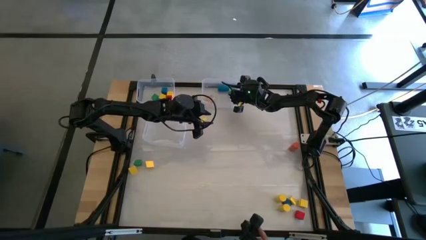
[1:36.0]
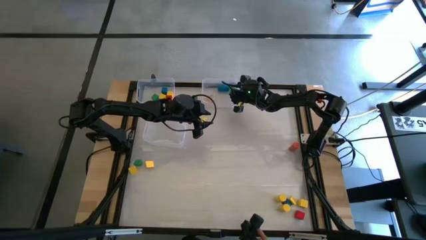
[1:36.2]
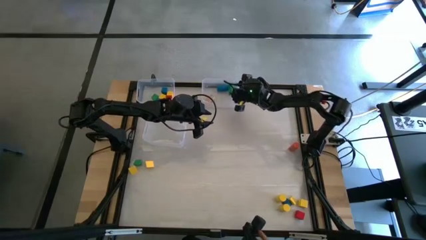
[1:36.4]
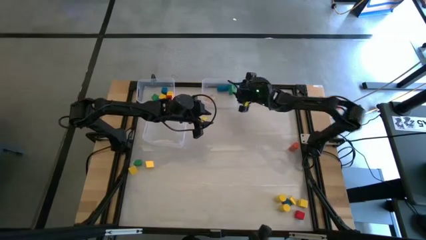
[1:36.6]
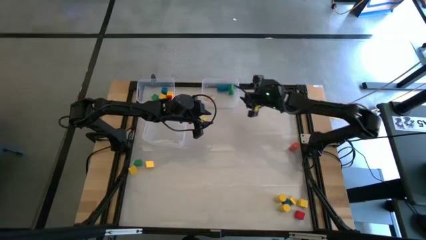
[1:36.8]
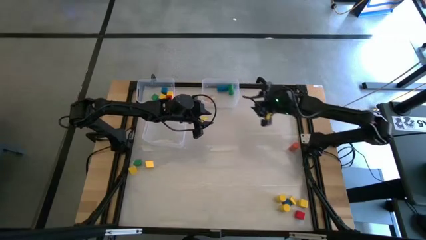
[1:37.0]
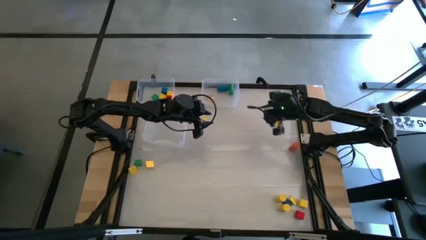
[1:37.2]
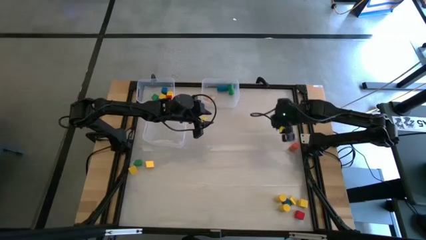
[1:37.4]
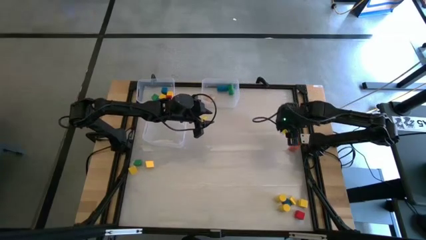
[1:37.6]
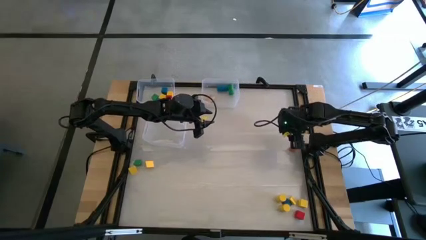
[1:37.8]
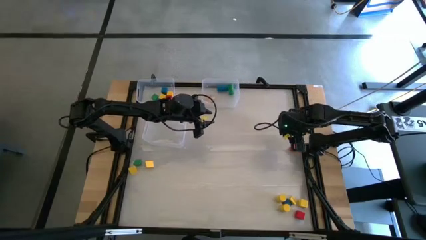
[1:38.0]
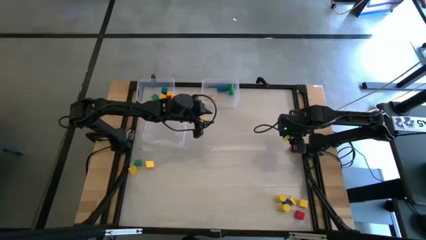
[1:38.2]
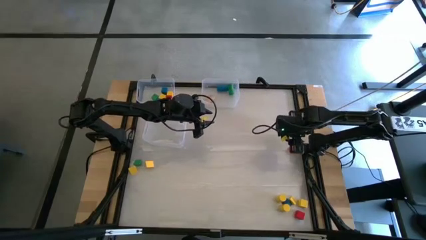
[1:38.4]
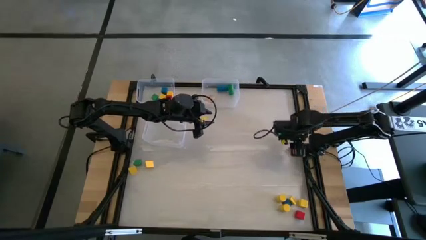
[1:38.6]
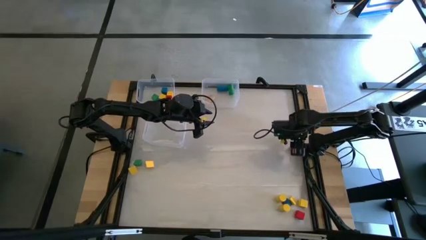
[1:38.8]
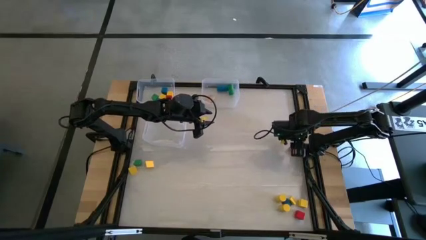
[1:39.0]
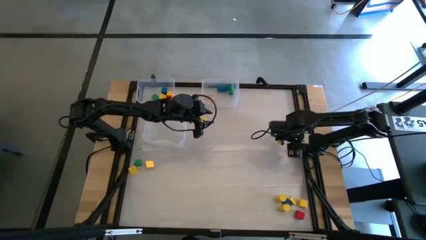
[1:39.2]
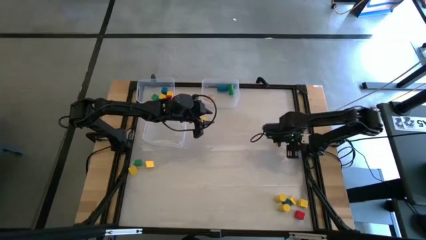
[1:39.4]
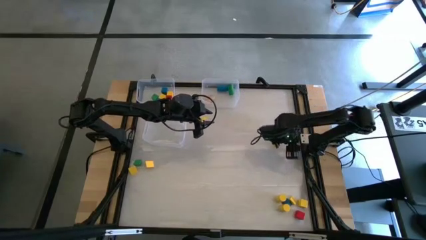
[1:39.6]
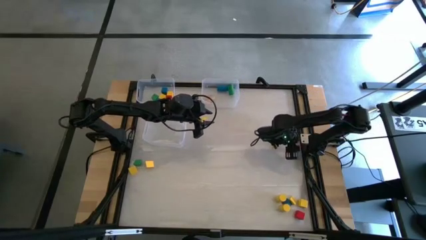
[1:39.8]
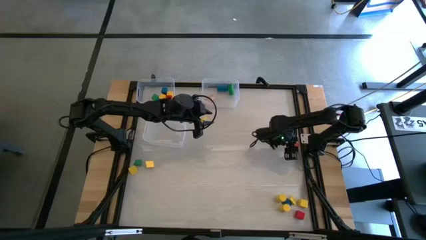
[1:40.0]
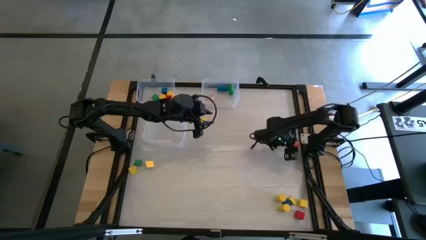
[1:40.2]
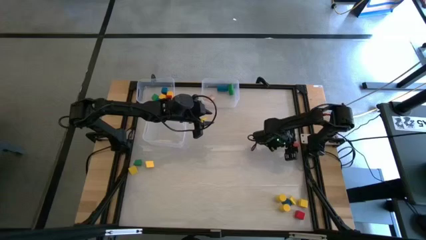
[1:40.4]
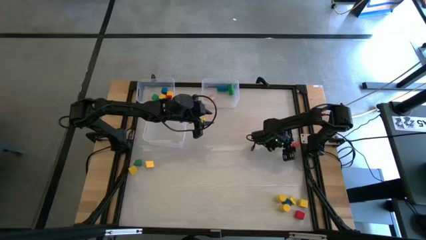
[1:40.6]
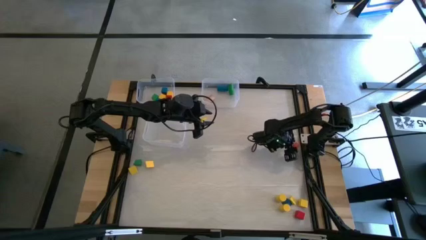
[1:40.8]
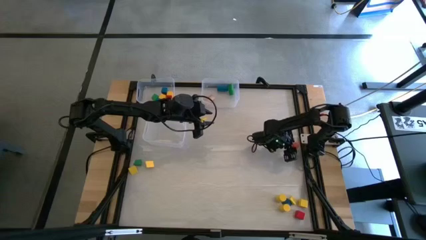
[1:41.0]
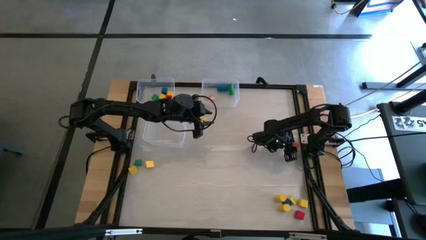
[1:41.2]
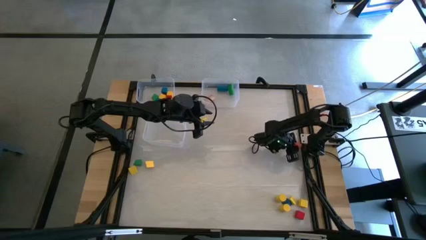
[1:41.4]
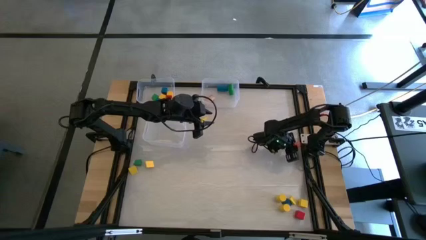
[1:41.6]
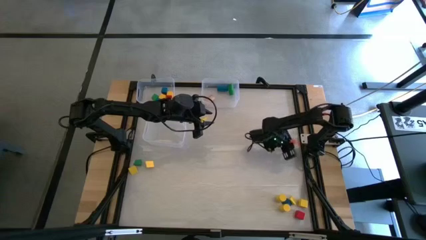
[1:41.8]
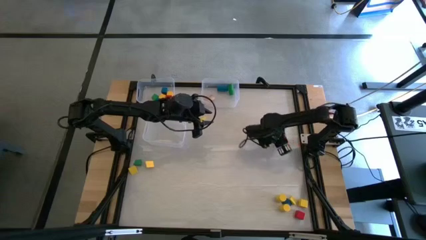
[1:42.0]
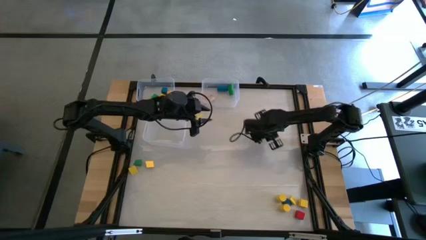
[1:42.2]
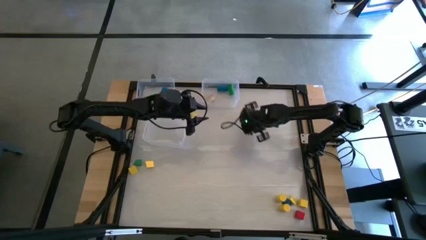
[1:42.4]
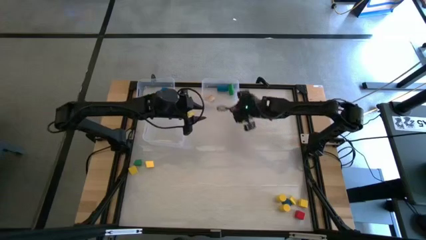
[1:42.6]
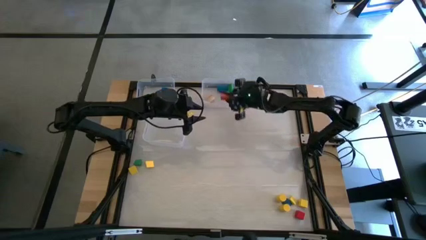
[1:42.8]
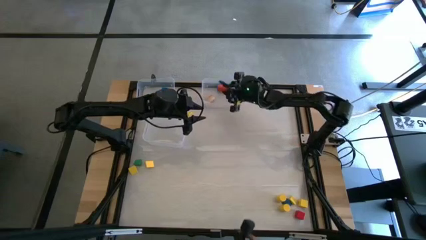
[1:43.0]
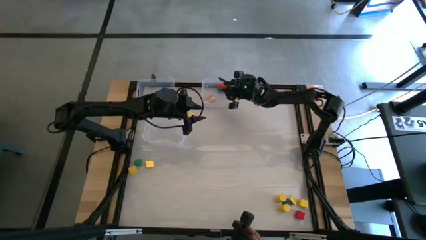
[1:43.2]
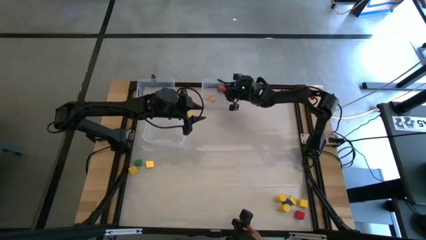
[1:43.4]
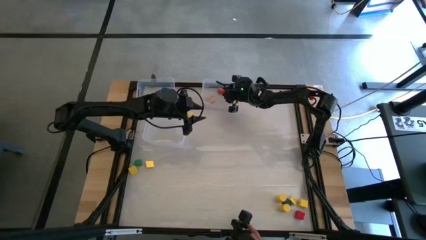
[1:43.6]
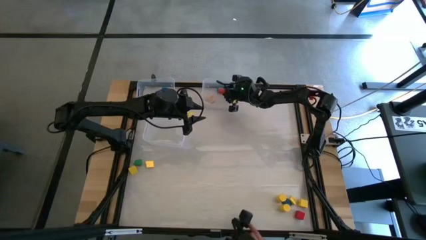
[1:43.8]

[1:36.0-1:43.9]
Task: Sort blocks by size
Put the orange cylinder game block into the top center transparent bin

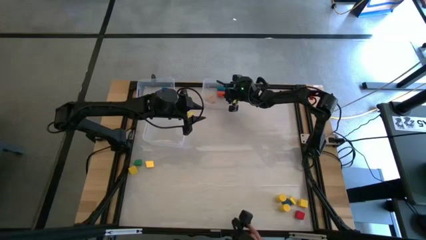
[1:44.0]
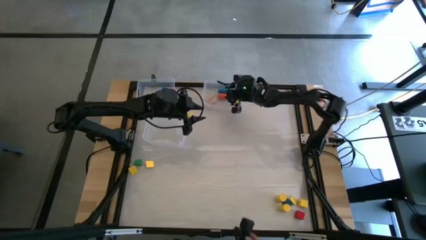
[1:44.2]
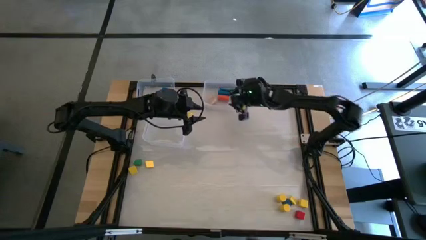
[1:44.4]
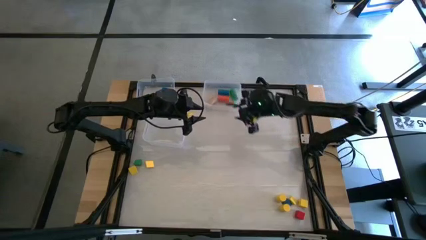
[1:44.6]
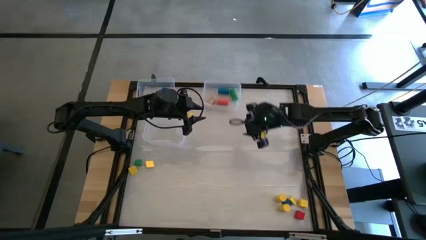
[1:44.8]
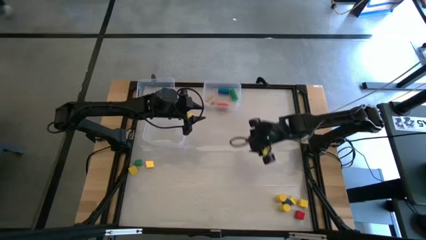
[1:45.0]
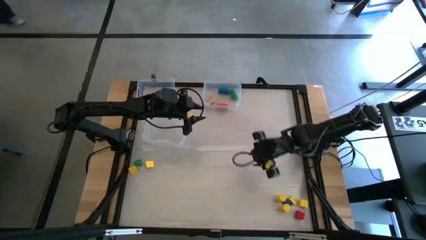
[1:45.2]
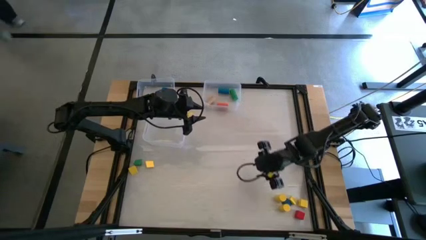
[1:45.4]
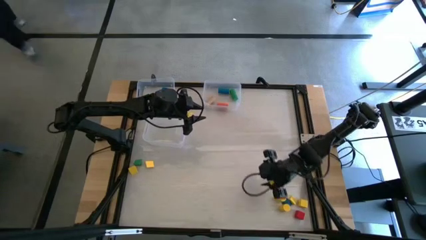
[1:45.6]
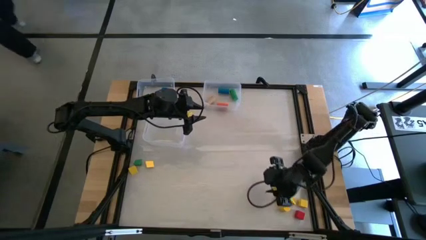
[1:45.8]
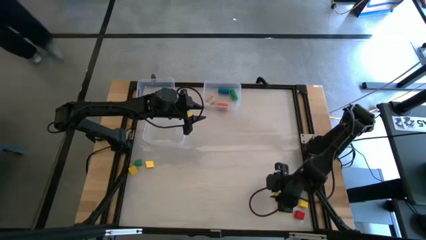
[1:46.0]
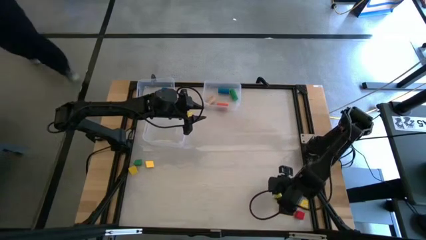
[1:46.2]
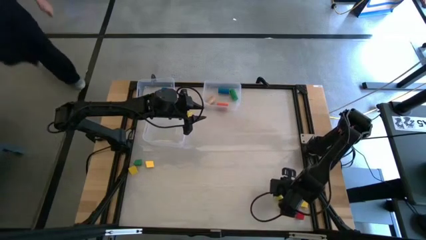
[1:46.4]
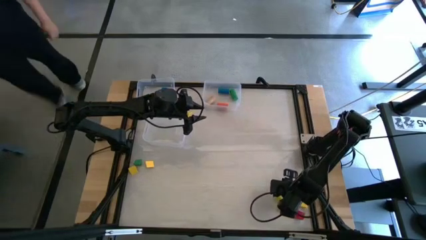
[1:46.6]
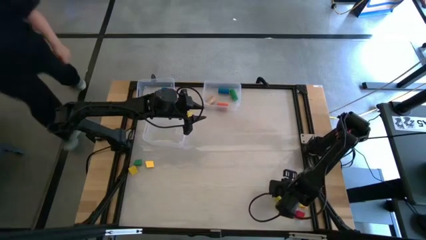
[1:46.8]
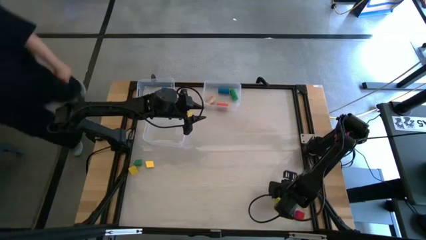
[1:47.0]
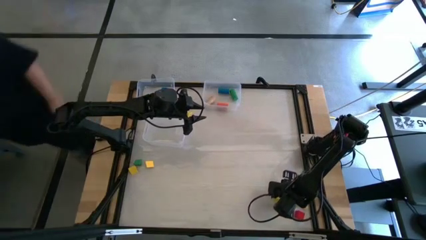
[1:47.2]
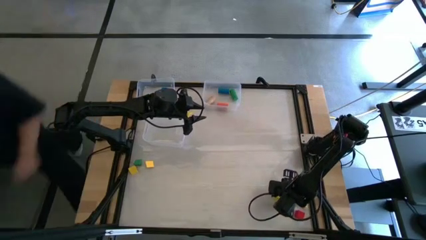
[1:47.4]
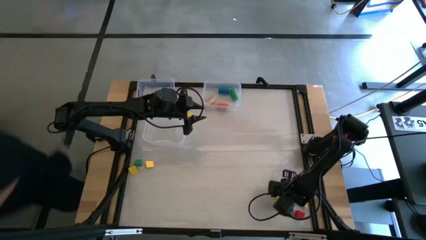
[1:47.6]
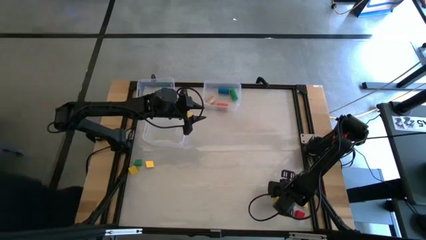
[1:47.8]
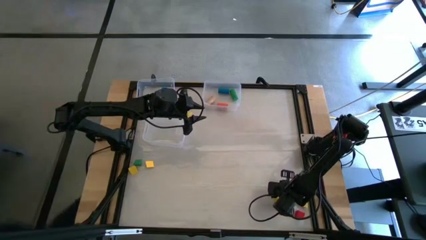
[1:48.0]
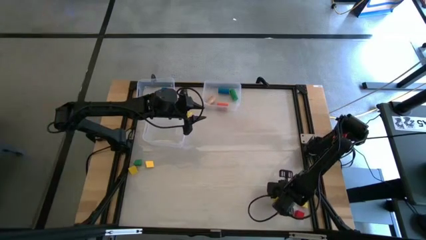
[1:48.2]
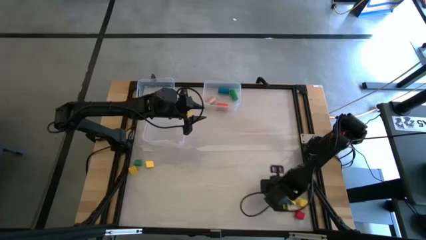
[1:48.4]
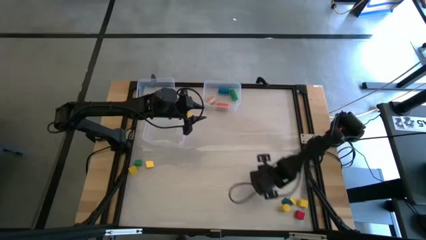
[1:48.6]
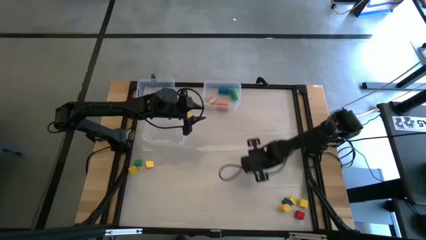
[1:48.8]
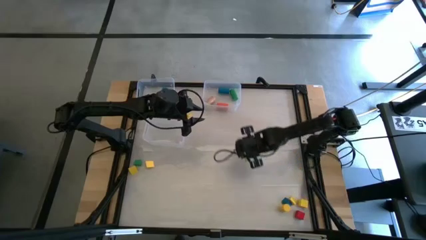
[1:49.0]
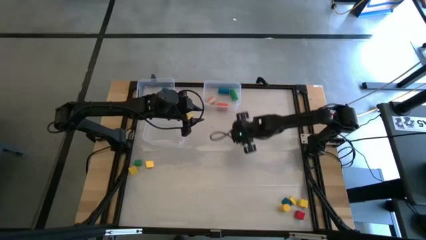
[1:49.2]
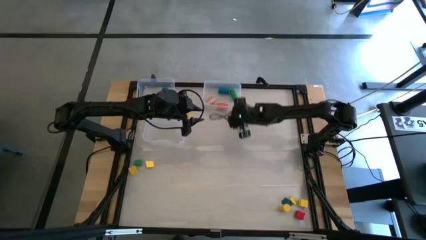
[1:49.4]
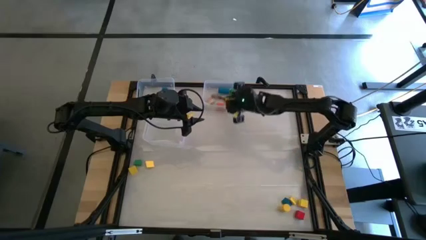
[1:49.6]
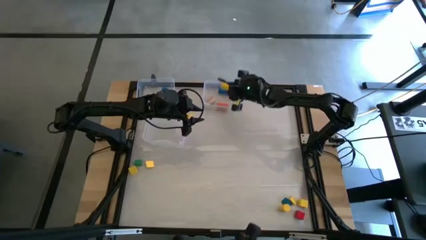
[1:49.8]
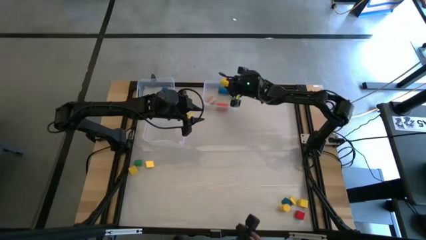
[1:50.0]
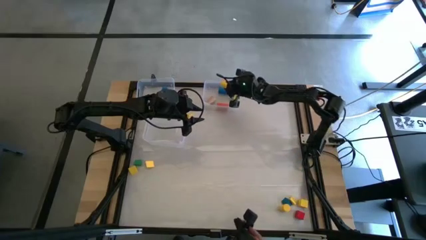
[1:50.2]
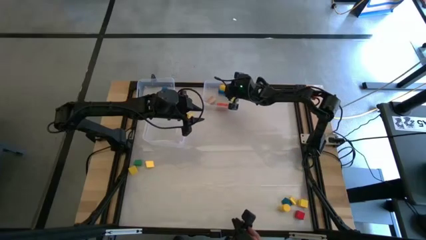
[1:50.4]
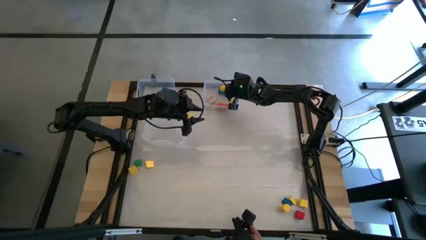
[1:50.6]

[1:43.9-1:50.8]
Put the yellow cylinder game block into the top center transparent bin

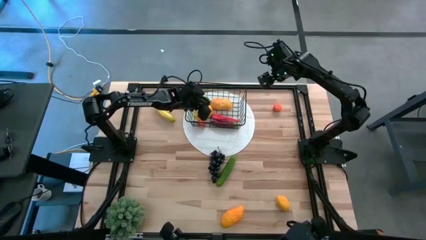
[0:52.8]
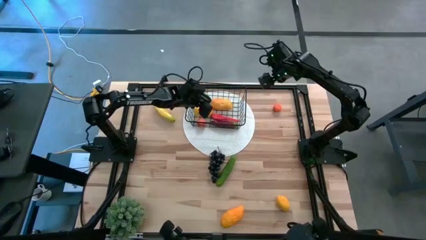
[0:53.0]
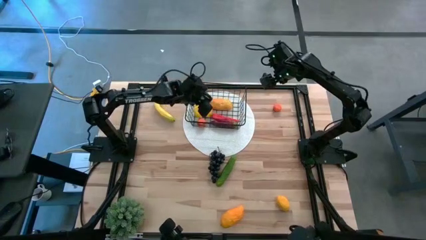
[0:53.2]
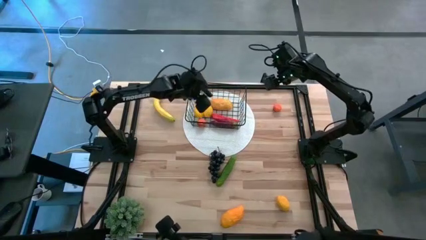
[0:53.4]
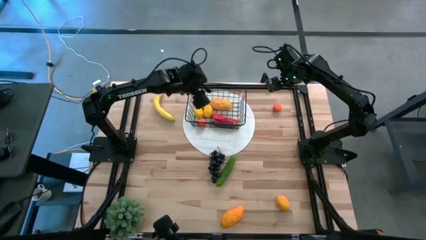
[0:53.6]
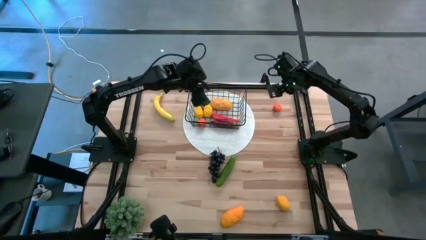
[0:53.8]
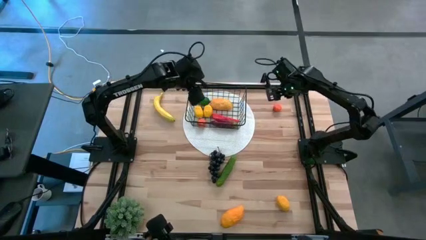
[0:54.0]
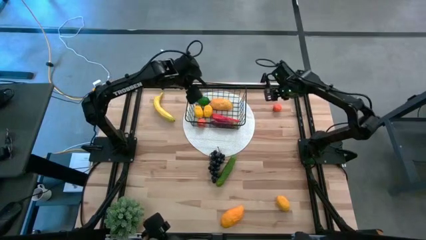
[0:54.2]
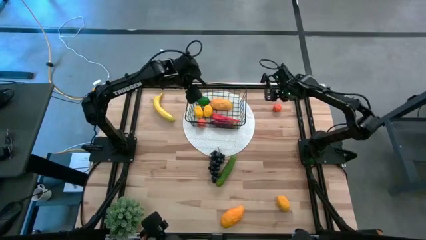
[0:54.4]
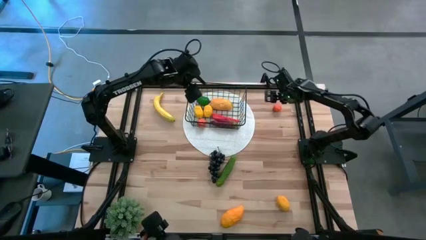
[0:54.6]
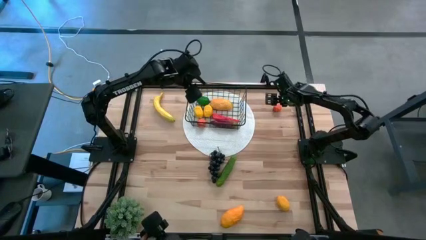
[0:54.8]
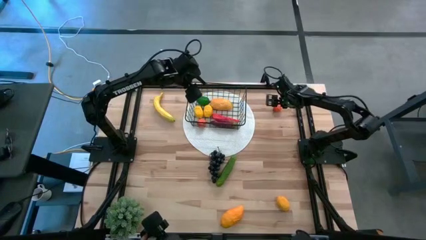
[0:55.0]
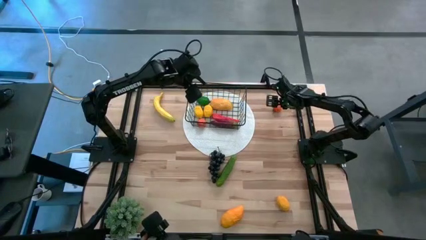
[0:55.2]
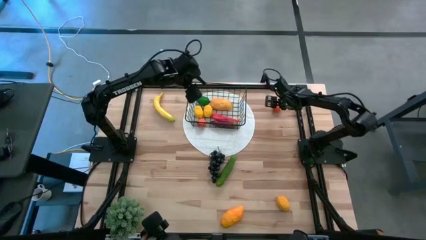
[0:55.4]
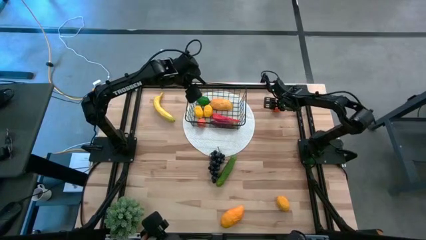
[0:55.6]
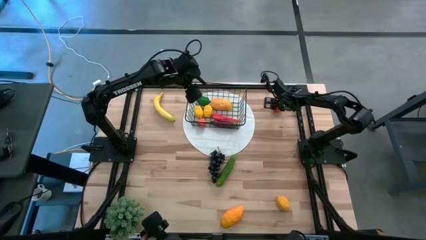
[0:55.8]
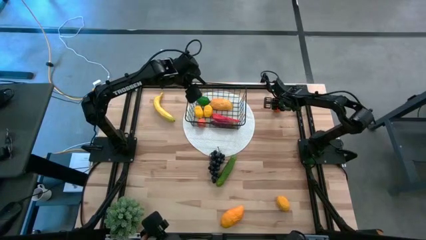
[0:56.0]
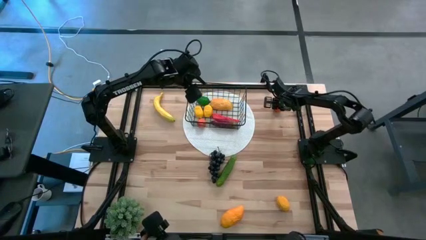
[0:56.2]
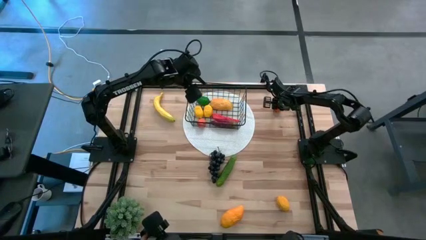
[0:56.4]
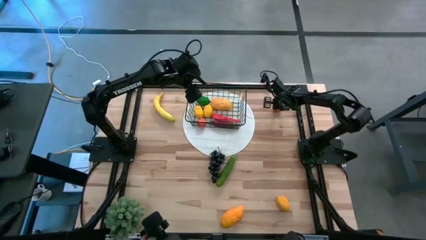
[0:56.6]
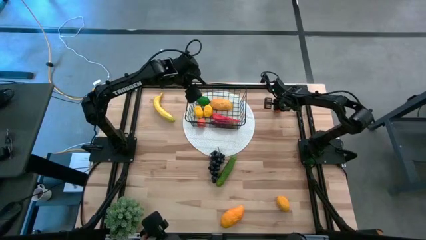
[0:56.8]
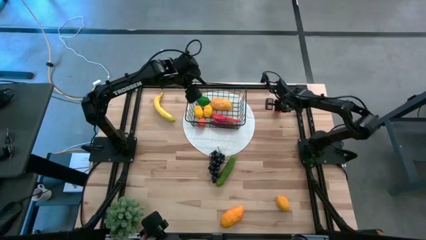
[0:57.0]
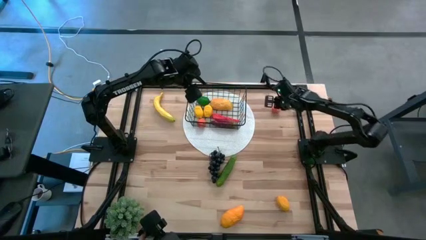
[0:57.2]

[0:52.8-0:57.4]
Task: Build produce basket
Put the orange into the black wire basket
